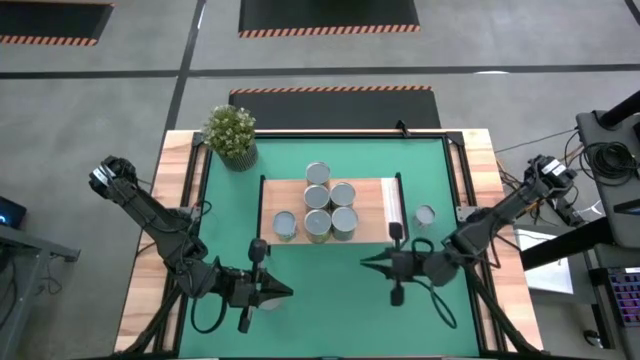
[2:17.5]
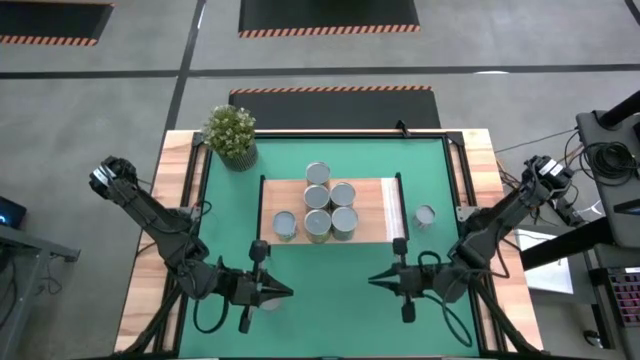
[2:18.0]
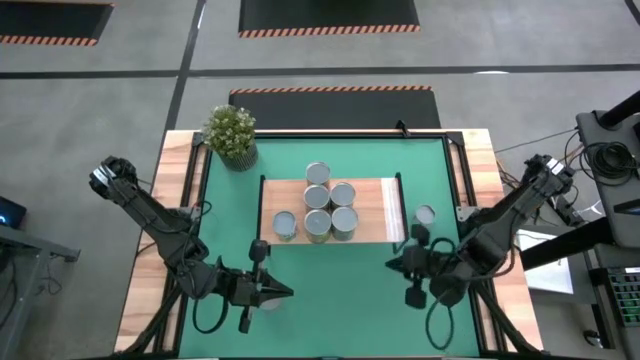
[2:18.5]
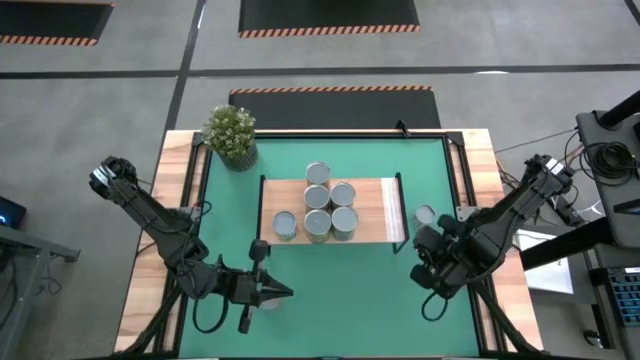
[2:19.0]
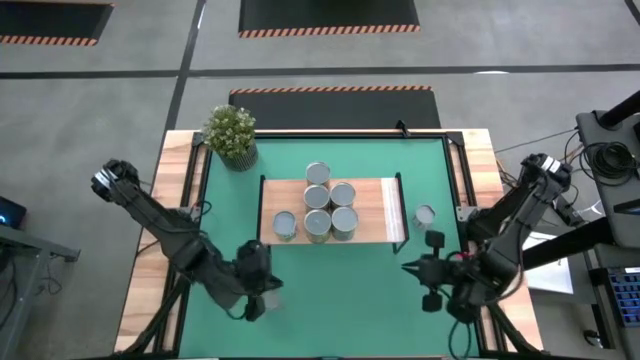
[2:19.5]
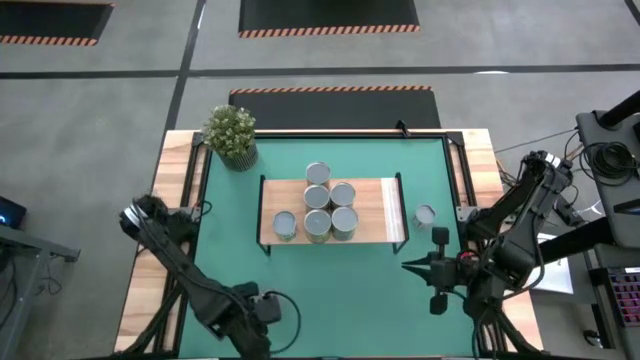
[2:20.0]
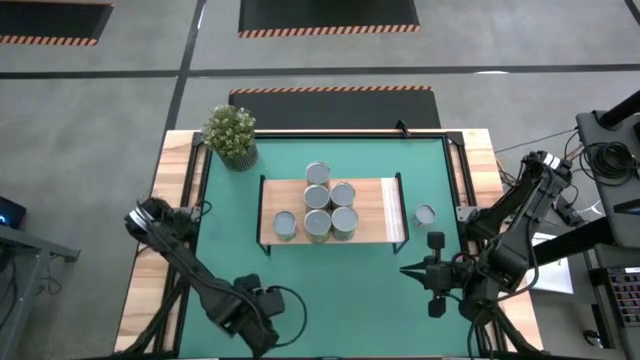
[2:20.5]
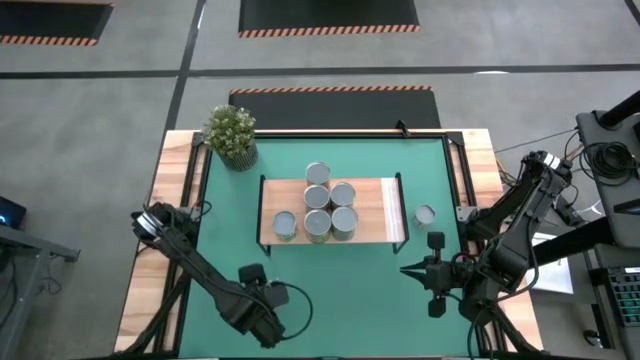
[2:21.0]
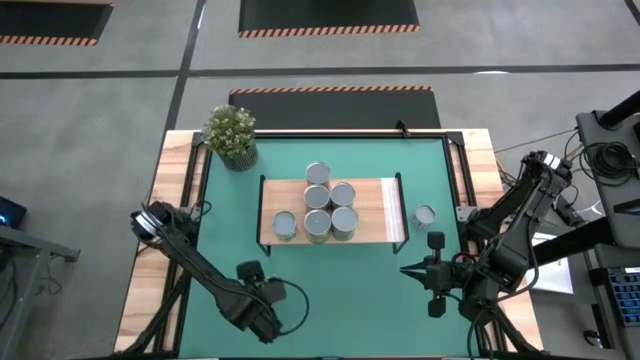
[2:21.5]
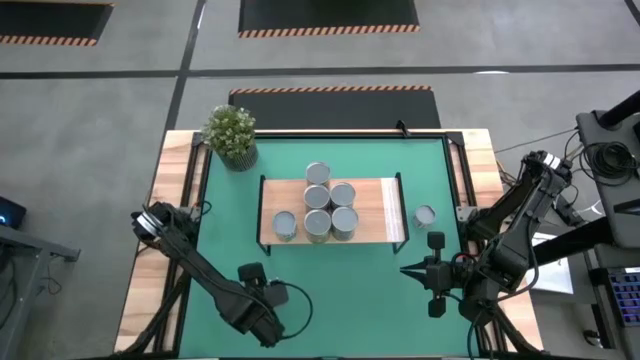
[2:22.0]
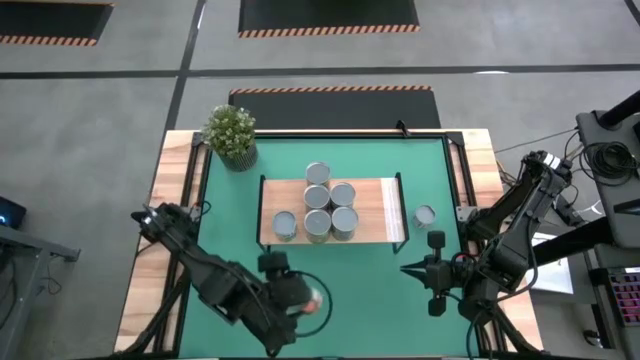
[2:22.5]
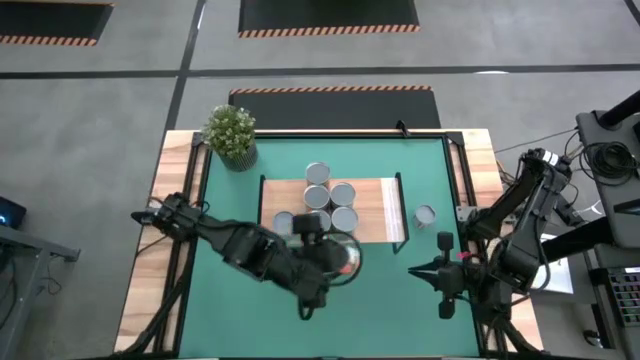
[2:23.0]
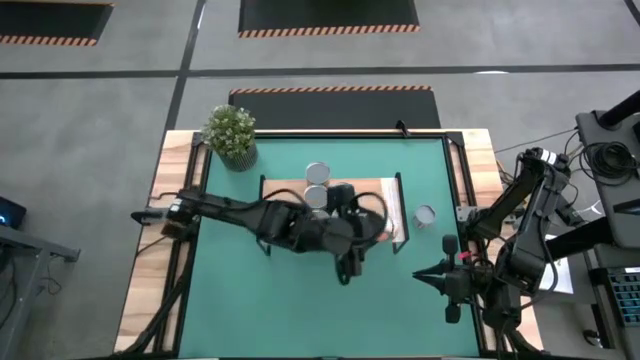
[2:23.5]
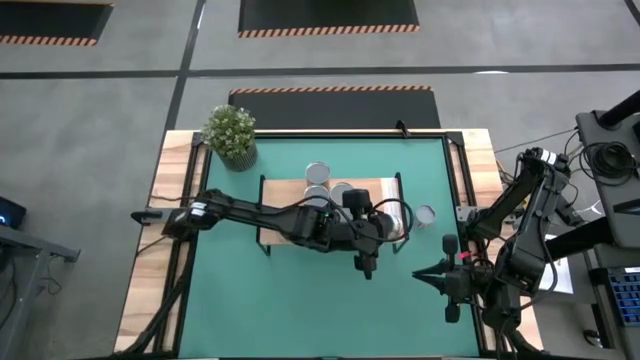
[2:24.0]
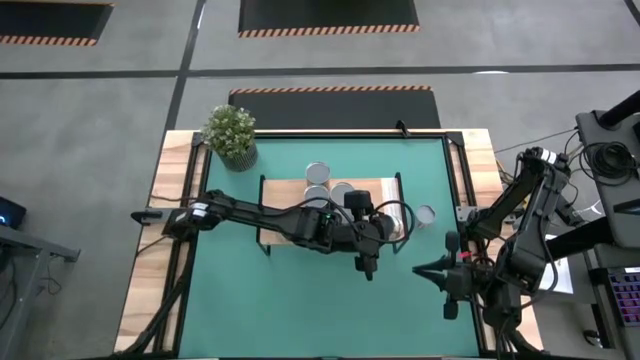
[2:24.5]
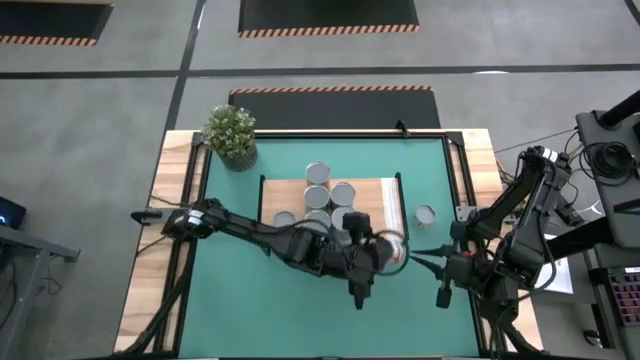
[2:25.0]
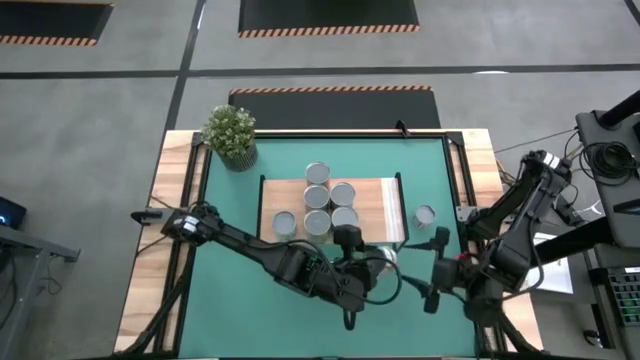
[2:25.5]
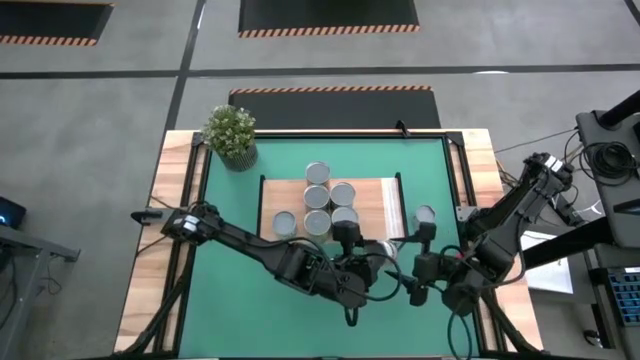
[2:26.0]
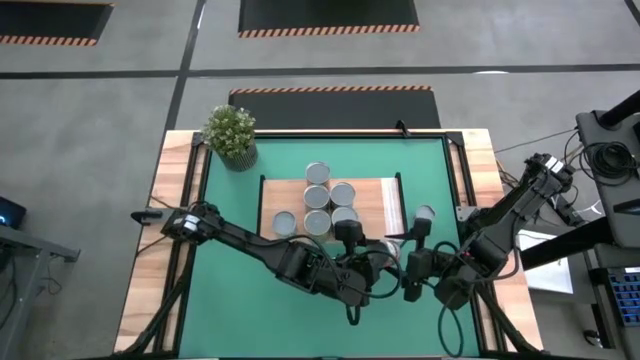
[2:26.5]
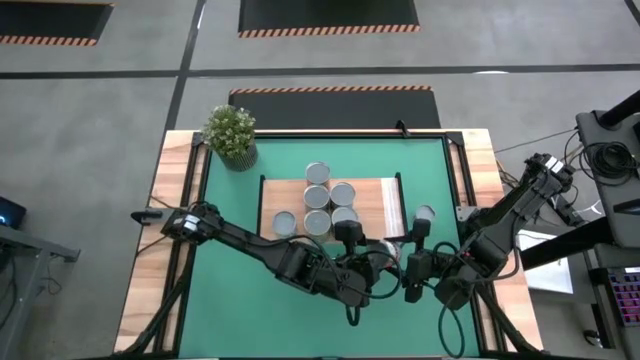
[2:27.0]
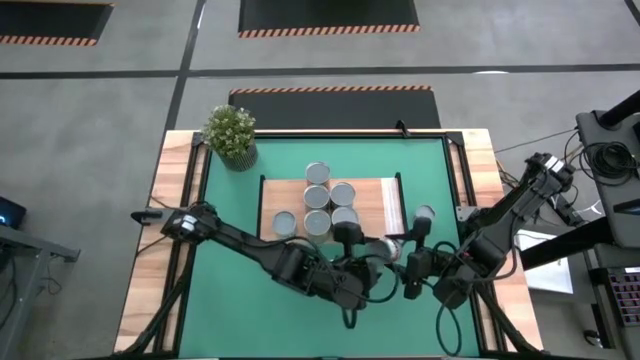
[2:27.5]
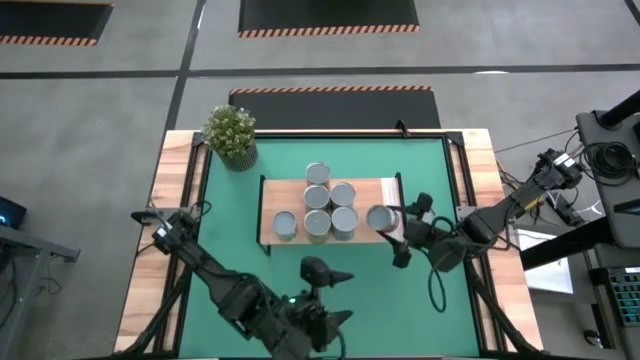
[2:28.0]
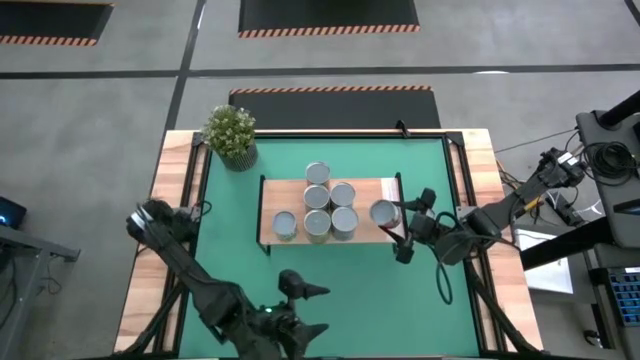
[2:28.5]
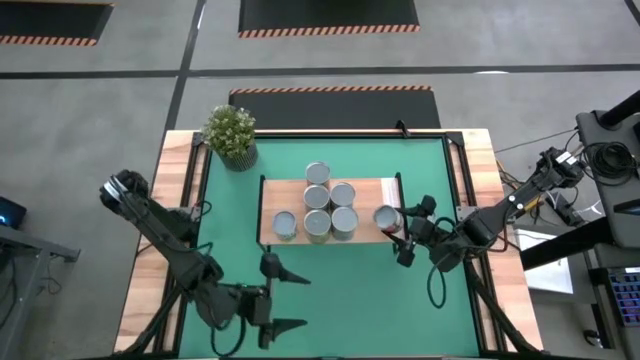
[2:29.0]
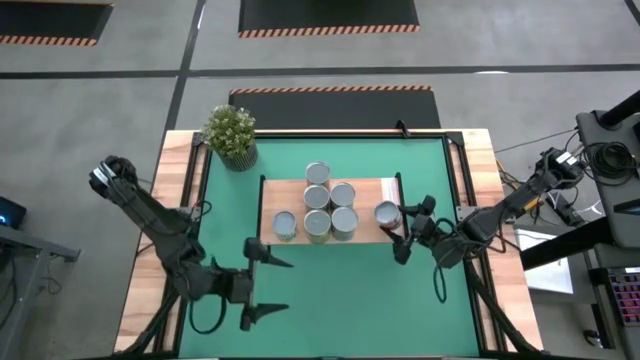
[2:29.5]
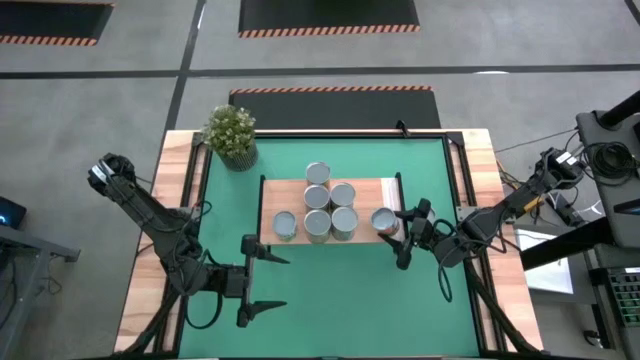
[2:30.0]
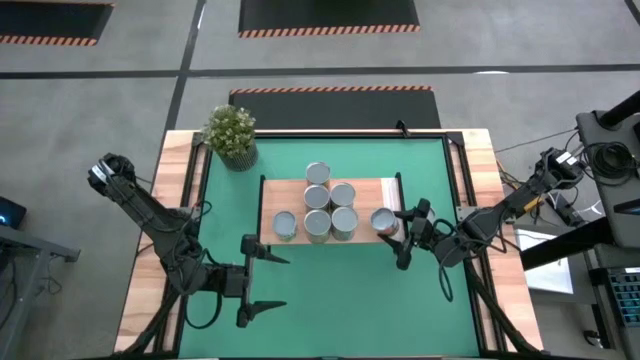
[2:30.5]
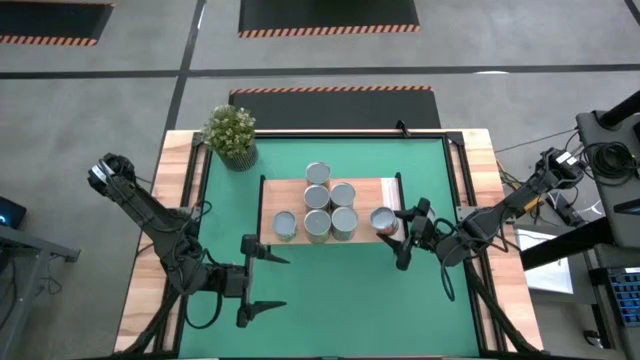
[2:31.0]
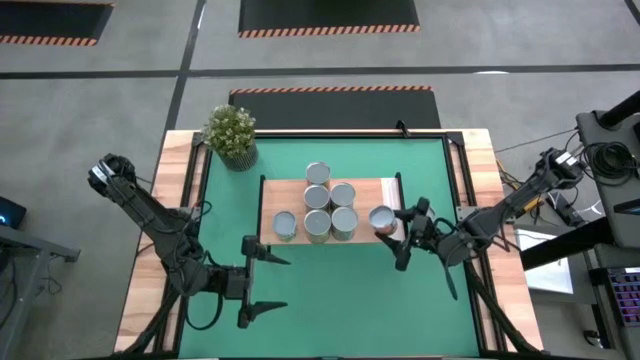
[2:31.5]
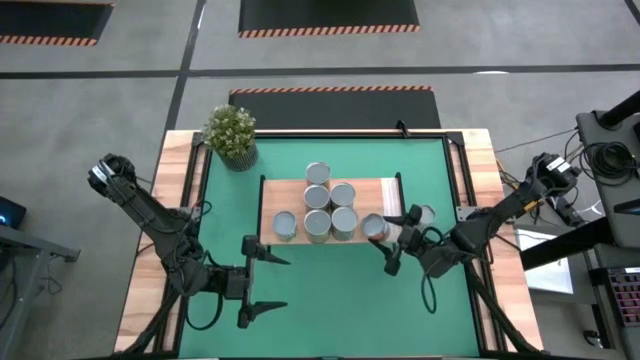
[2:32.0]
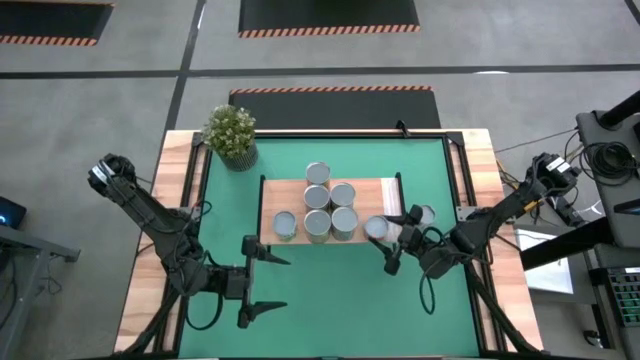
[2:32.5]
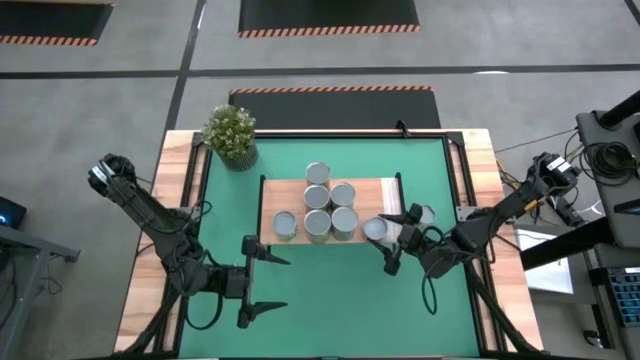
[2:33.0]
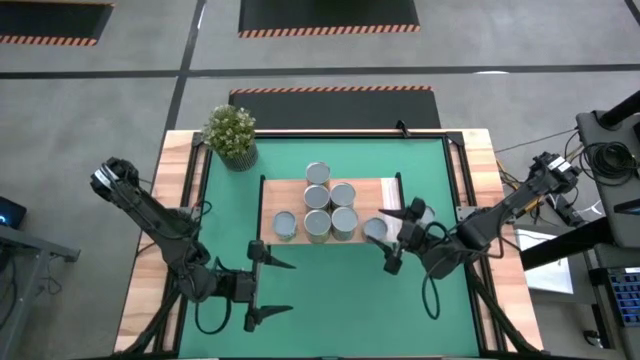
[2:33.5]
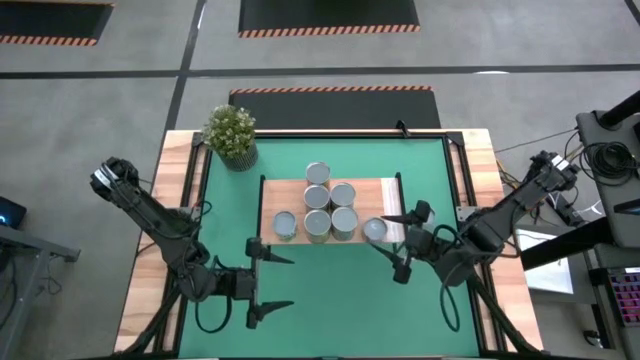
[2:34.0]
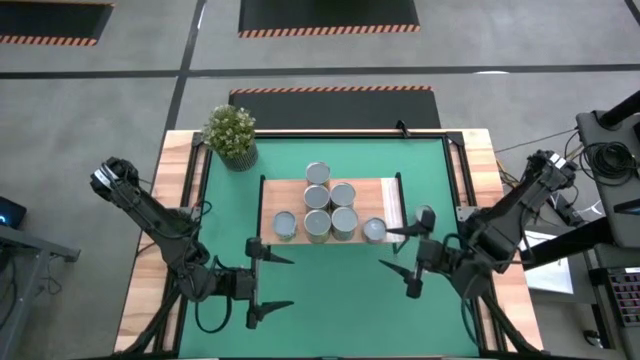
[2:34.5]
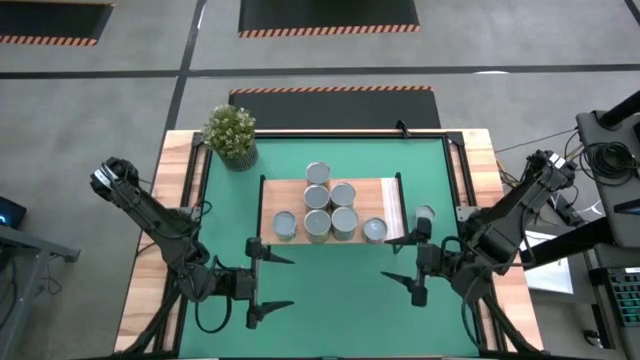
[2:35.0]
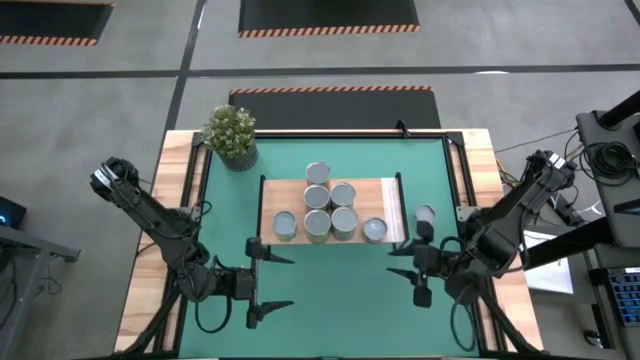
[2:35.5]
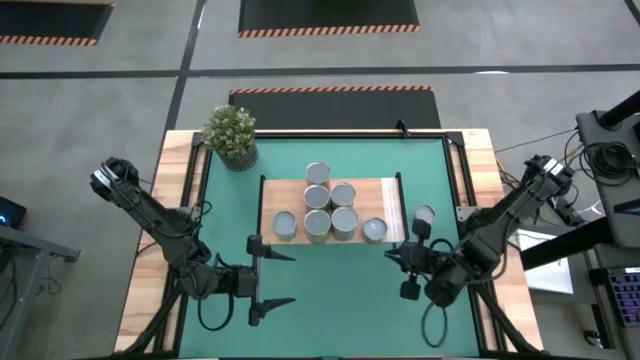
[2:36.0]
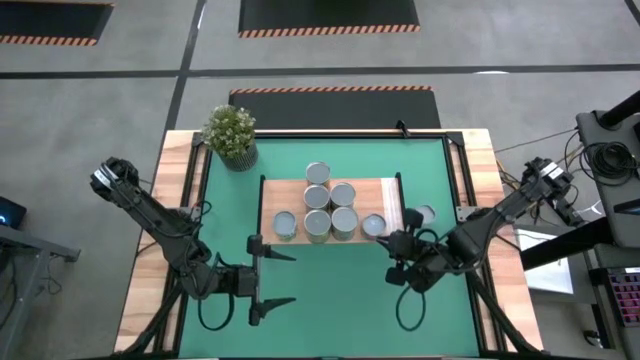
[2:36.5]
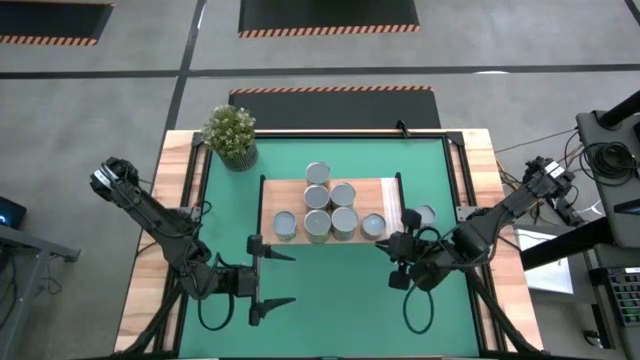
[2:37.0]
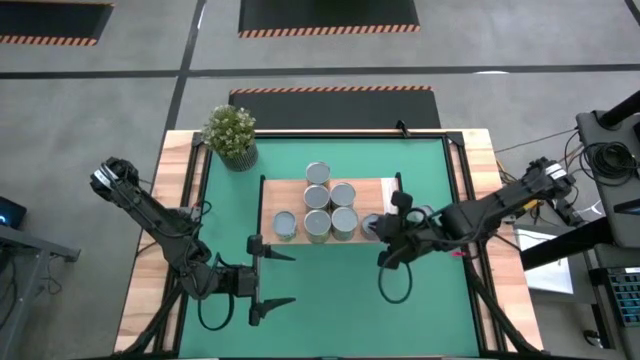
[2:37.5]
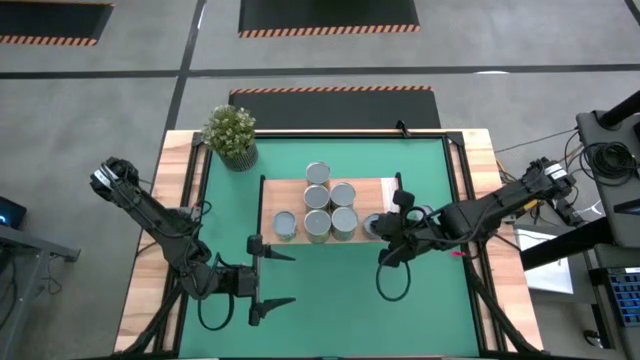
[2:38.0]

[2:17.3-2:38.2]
Task: Pick and place cans onto a shelf
Put the small canned of oranges on the shelf
